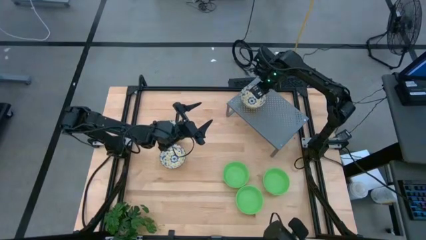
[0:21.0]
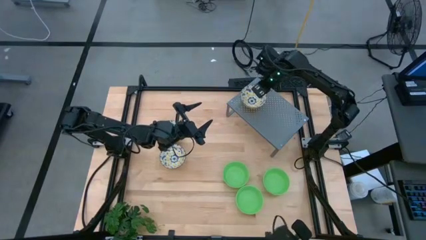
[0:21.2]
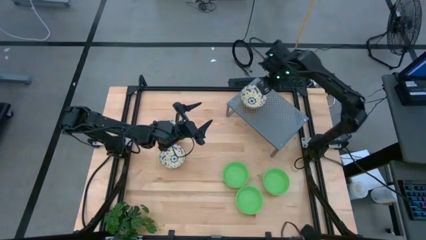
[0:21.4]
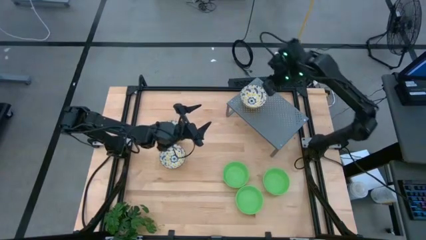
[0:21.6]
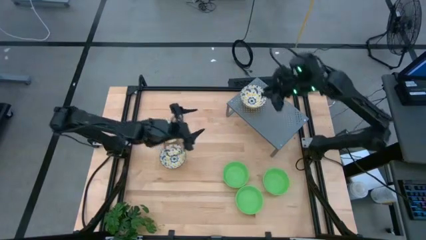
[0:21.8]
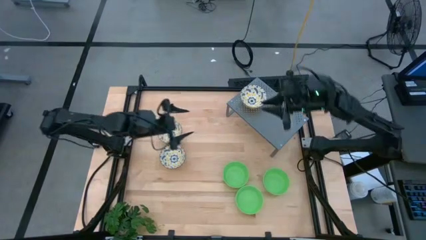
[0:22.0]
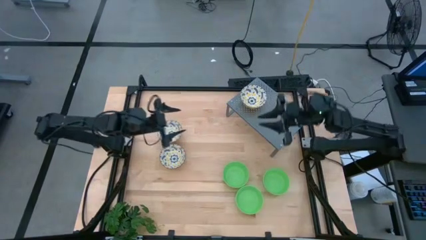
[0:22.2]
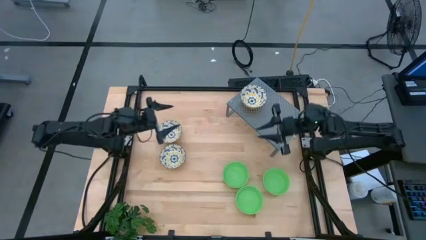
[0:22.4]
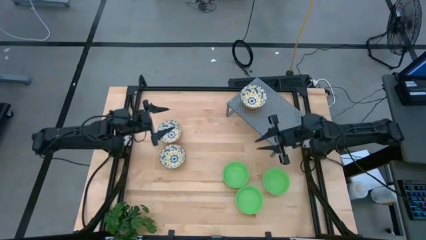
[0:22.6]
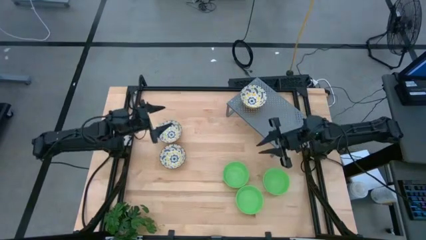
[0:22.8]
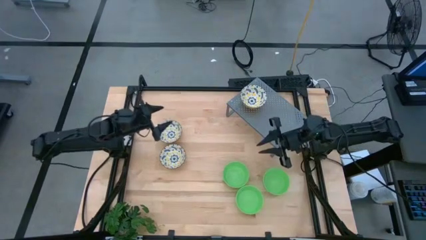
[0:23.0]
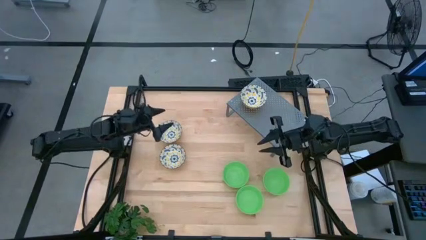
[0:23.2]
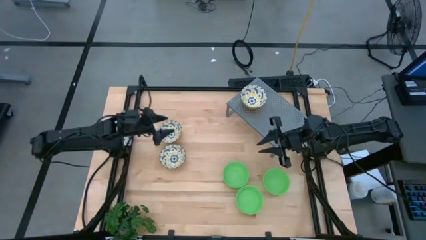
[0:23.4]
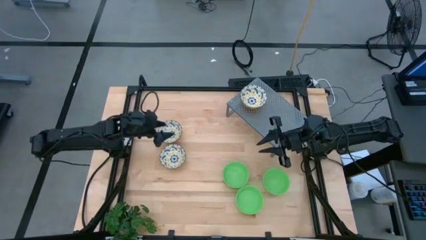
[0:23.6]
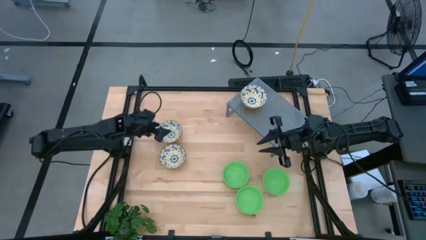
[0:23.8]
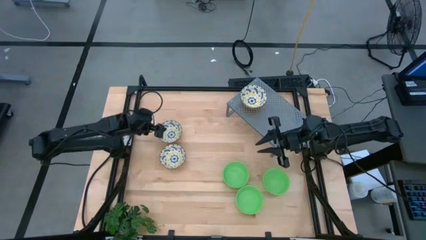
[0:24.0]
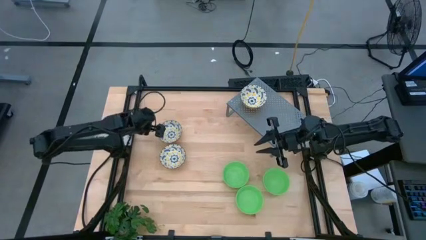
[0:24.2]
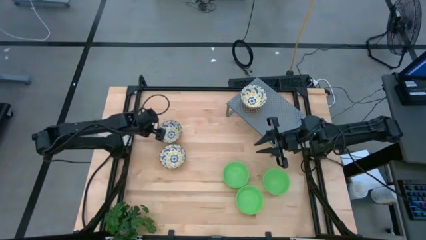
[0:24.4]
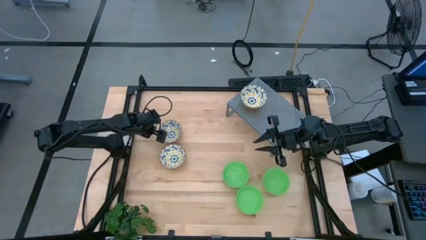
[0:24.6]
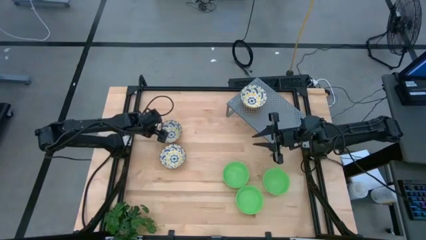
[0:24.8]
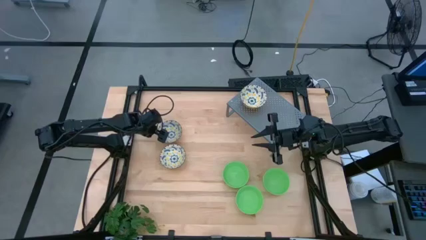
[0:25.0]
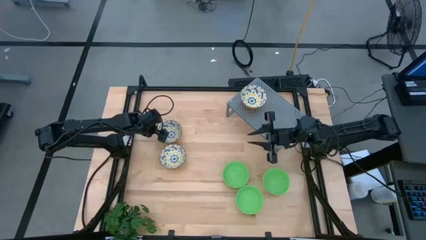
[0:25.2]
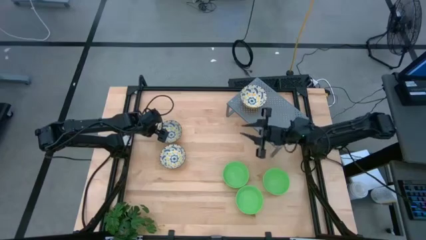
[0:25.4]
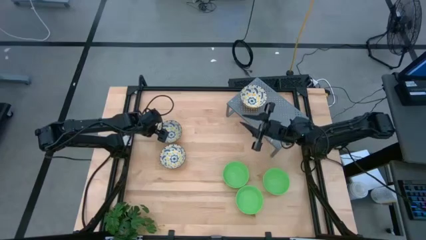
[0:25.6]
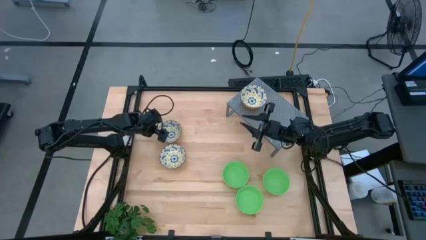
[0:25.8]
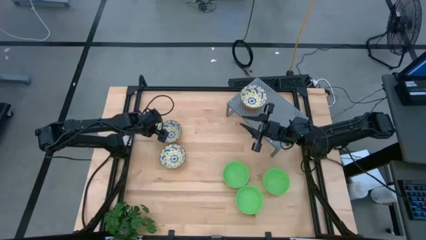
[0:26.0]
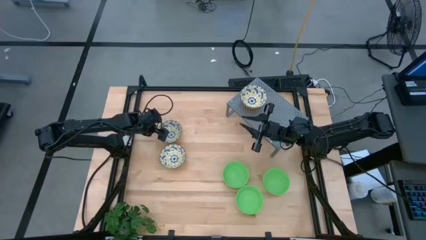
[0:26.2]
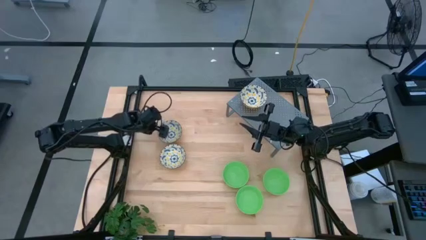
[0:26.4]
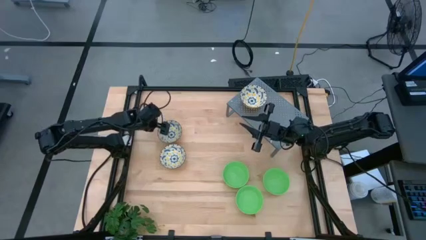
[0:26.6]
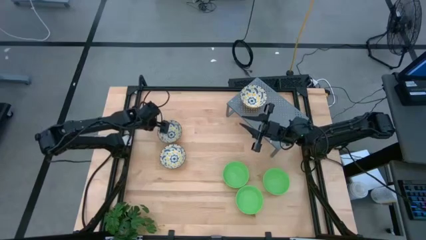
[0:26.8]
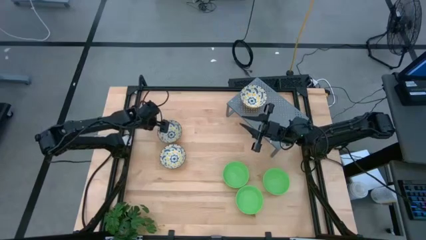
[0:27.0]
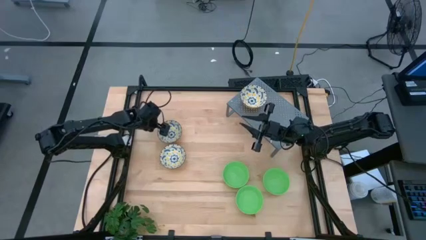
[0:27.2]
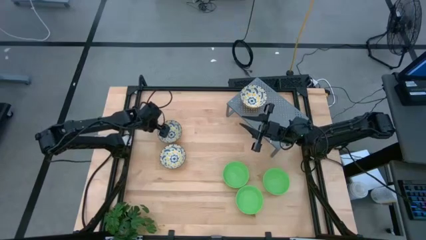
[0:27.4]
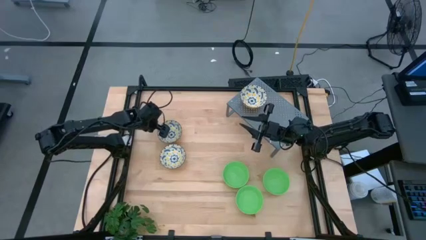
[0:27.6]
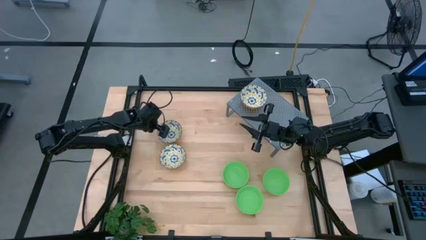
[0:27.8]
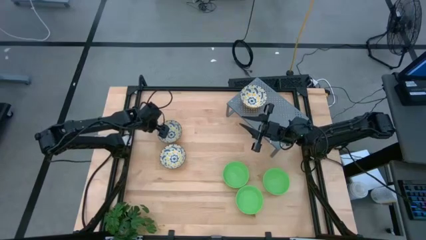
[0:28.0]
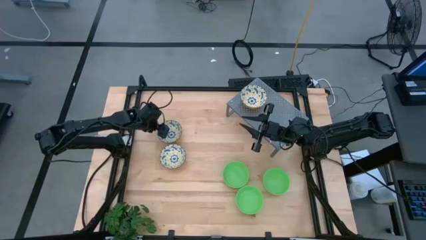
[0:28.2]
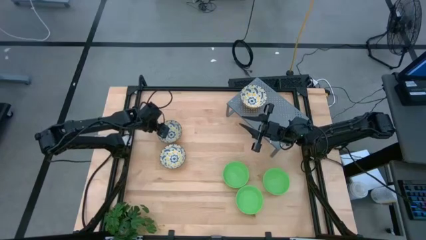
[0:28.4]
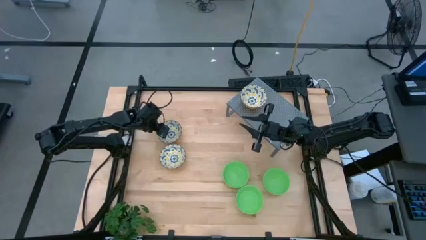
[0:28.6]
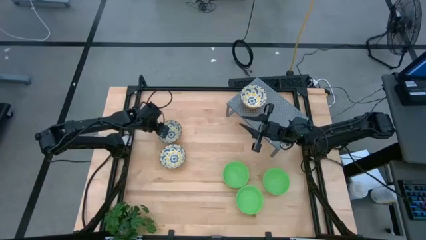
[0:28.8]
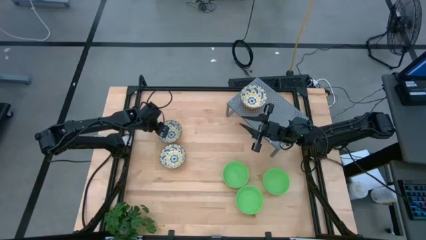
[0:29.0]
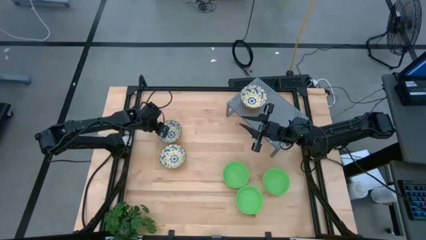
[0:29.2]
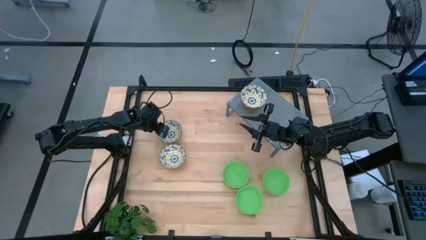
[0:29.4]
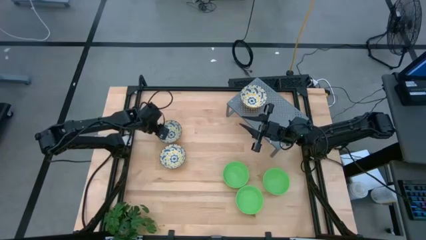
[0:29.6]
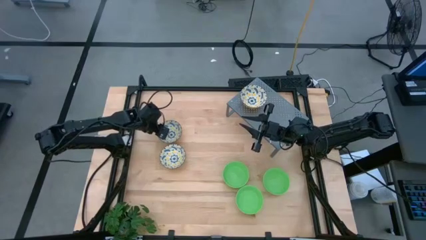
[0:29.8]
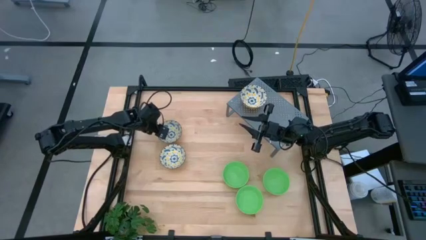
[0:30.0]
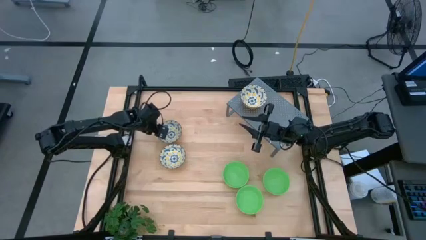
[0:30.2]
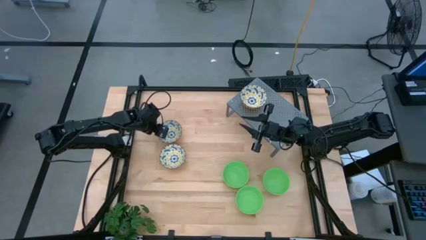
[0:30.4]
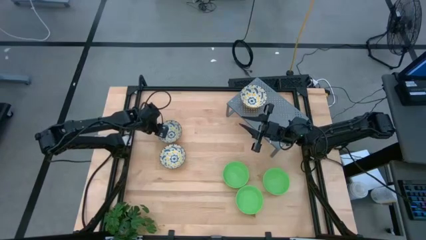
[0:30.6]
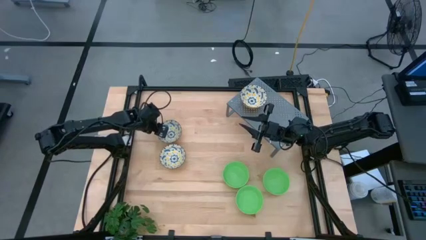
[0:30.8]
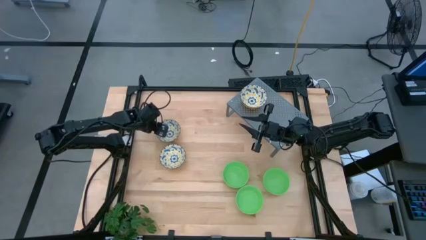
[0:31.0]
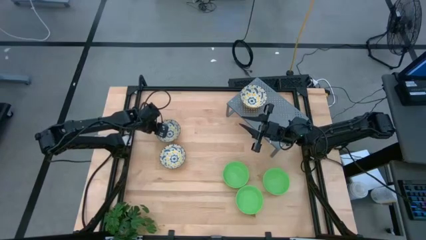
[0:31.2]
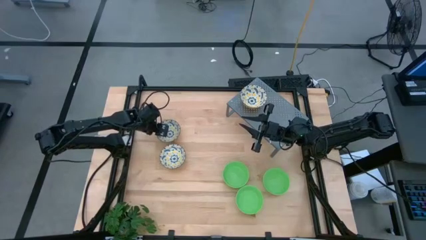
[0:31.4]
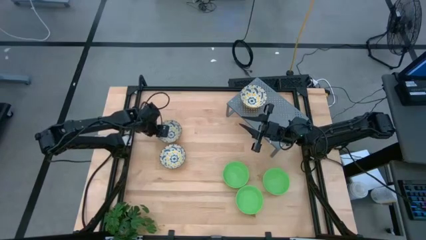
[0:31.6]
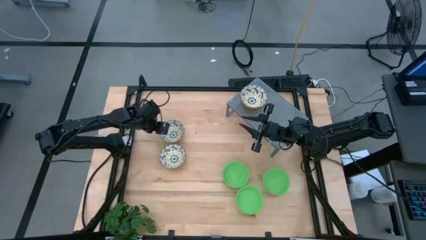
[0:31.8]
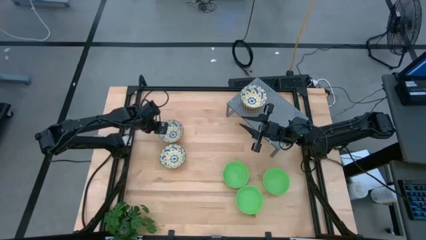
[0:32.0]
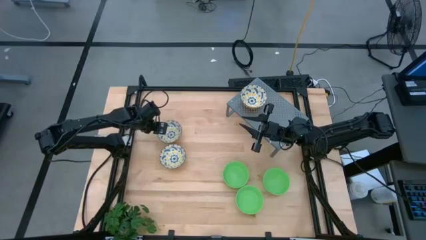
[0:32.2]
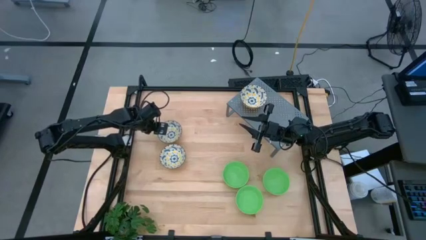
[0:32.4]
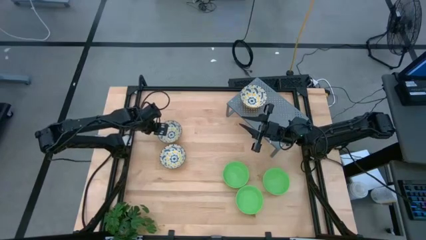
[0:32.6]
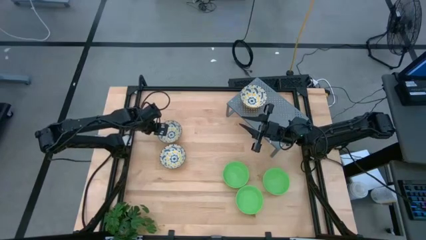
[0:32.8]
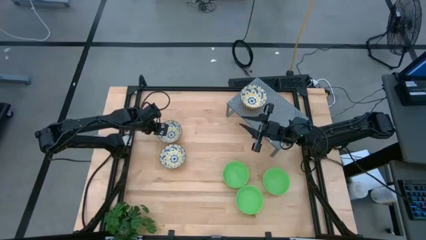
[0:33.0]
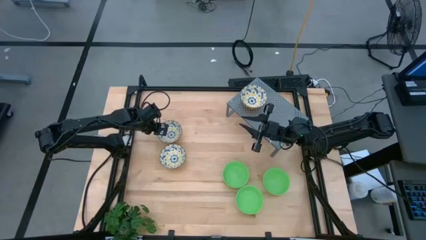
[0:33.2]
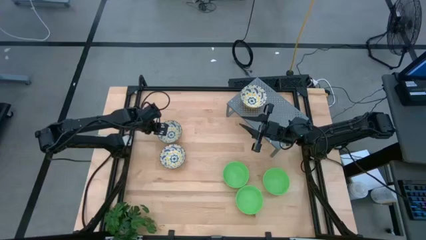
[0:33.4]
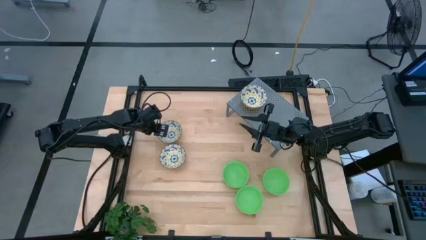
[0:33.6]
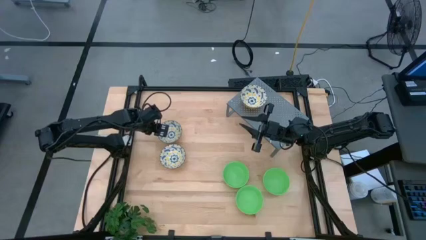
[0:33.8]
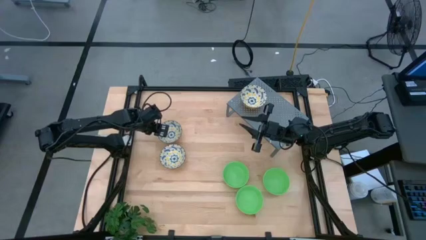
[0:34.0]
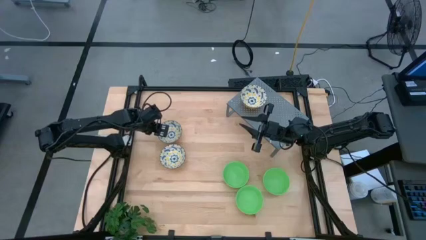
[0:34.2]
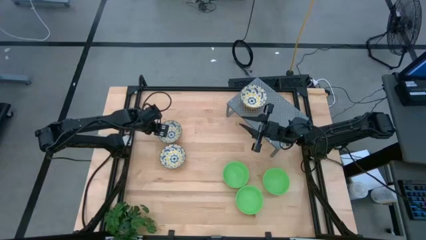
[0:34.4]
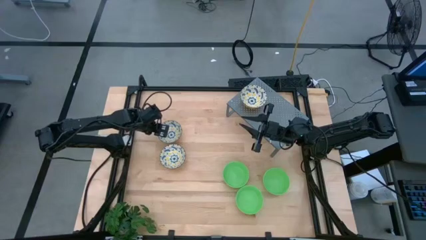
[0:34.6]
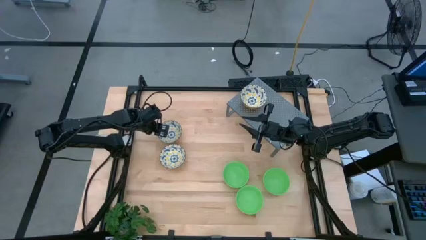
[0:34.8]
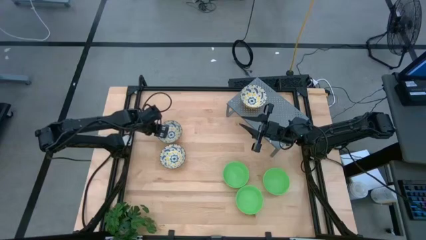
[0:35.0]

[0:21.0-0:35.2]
Task: Pick & Place Mini bowls
Stack the top yellow bowl on the yellow bowl on the shelf

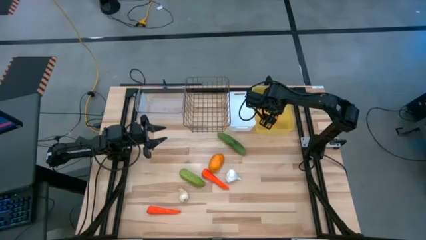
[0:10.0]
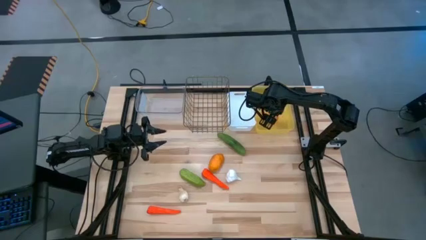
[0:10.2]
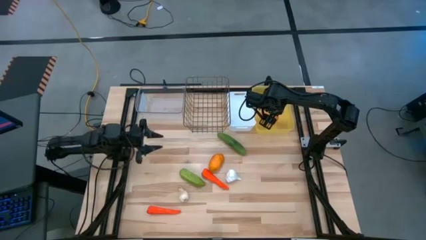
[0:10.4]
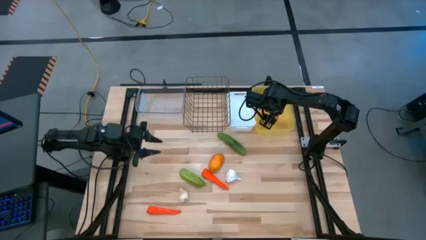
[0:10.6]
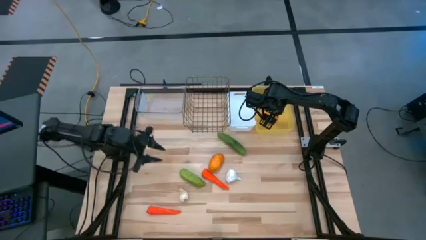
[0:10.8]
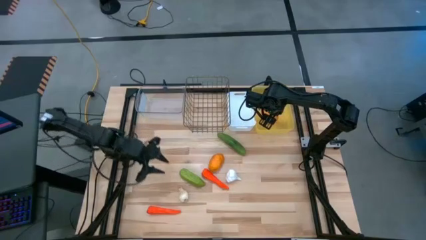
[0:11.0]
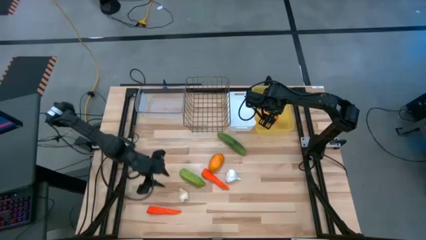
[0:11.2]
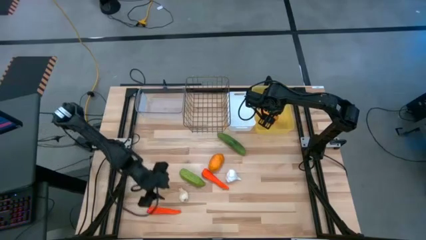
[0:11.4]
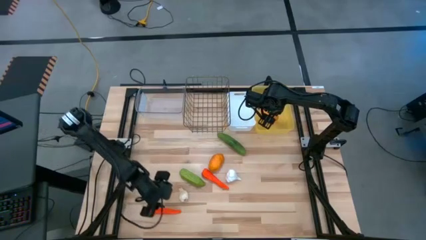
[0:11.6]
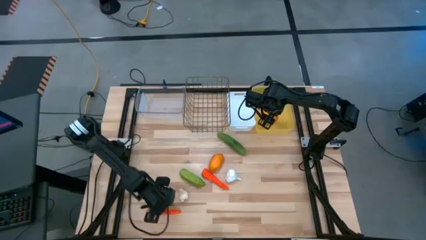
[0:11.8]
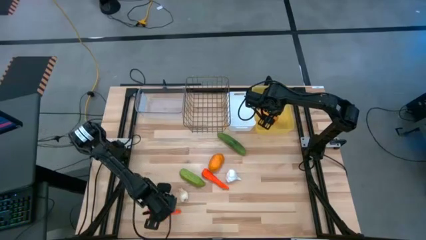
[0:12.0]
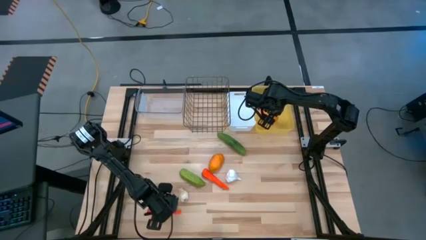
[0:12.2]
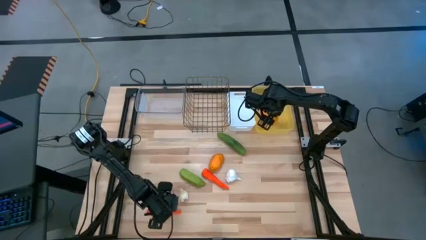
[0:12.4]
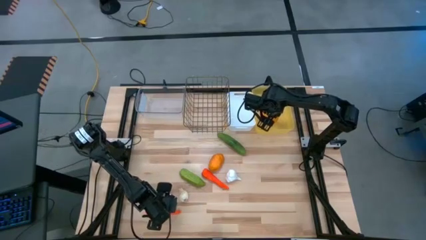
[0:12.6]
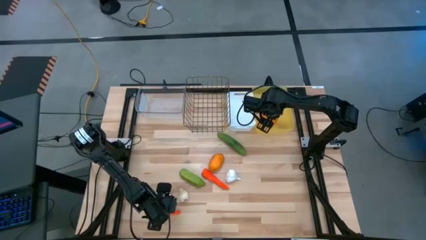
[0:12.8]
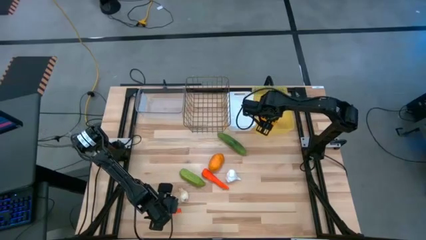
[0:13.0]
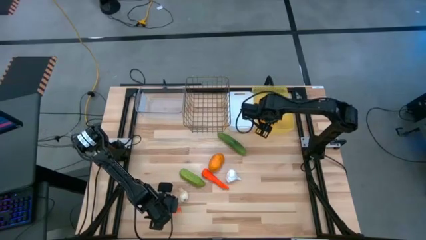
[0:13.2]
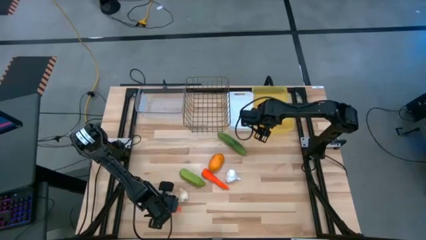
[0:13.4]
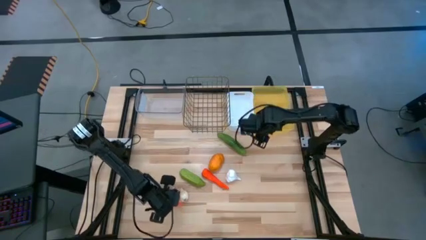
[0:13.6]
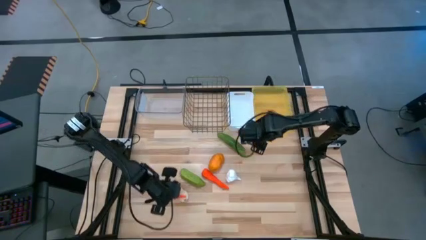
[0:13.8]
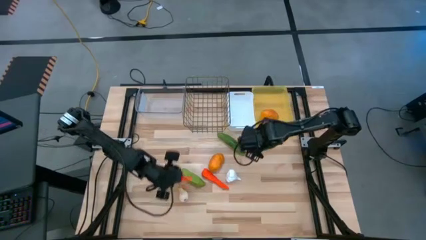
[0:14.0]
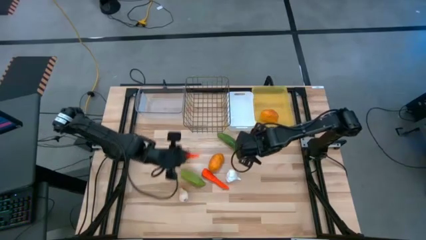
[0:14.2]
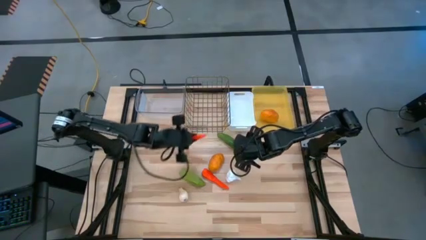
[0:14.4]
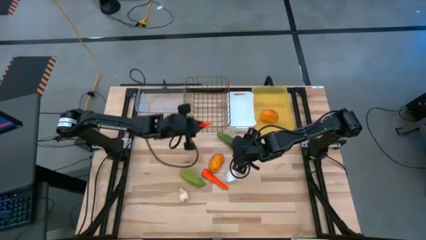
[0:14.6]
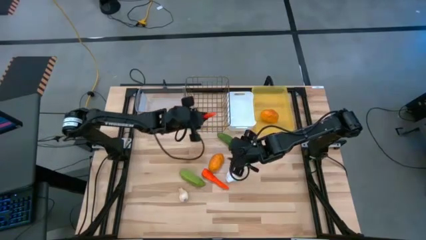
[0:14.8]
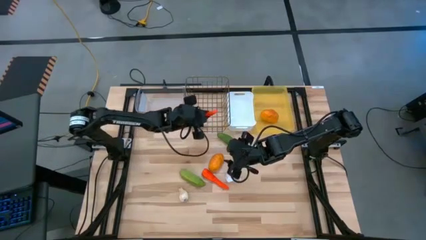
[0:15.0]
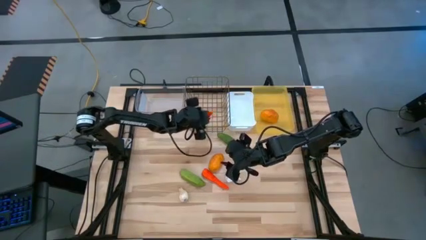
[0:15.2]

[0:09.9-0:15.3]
Task: Sort produce into baskets
Put the bottom carrot into the wire basket
